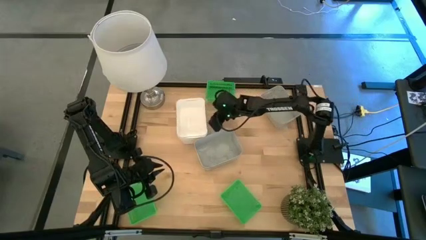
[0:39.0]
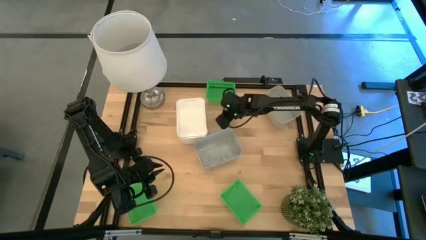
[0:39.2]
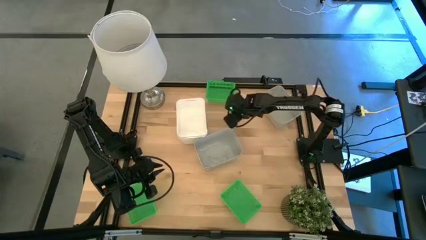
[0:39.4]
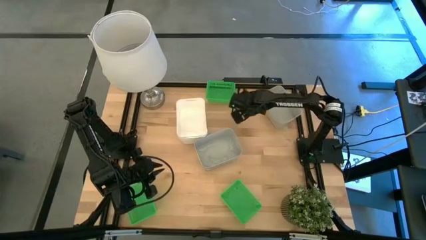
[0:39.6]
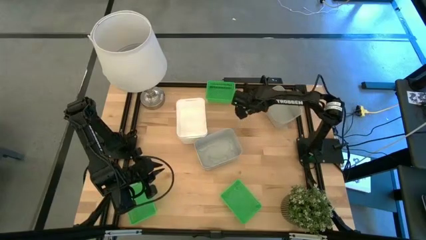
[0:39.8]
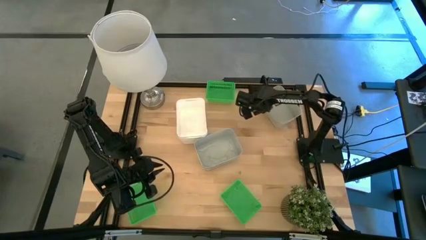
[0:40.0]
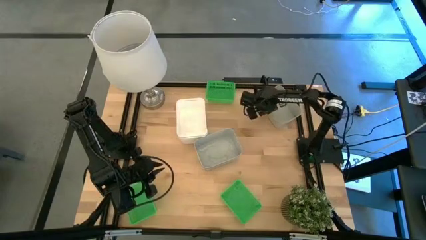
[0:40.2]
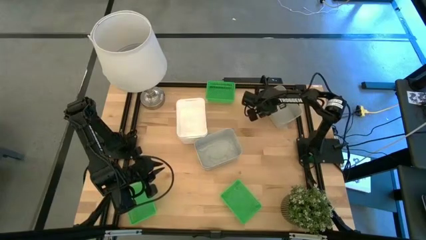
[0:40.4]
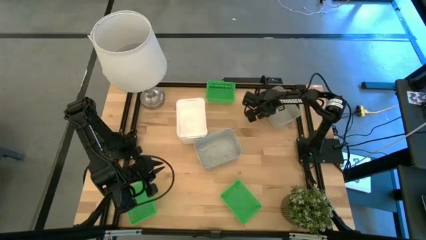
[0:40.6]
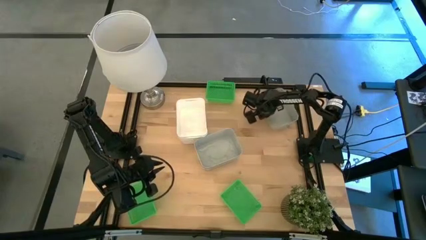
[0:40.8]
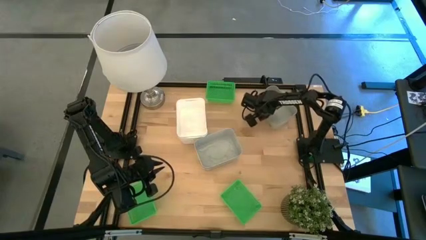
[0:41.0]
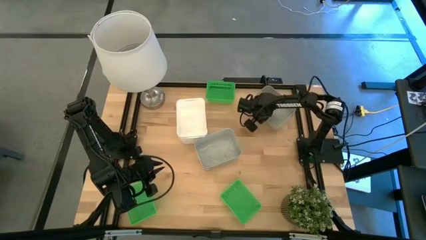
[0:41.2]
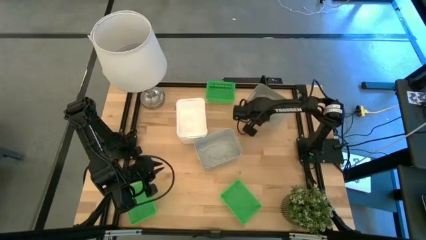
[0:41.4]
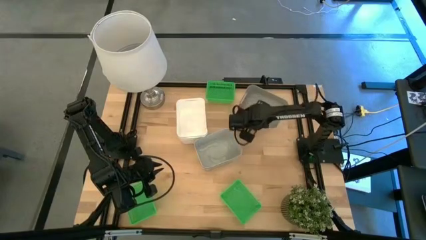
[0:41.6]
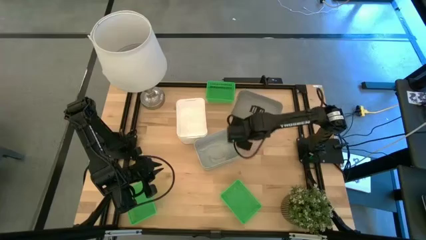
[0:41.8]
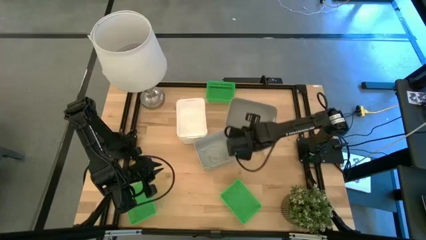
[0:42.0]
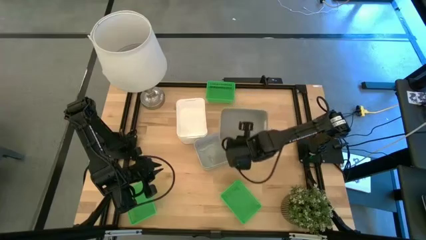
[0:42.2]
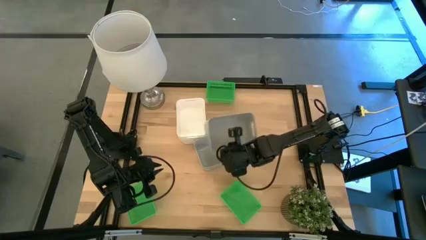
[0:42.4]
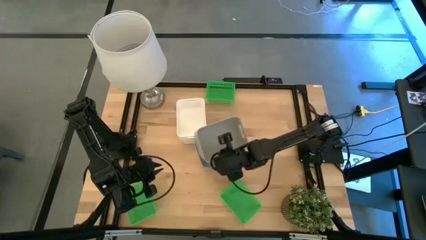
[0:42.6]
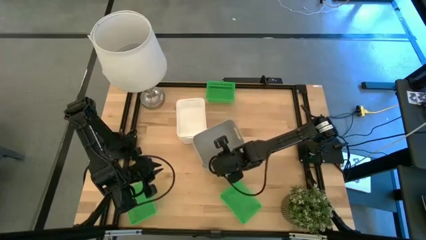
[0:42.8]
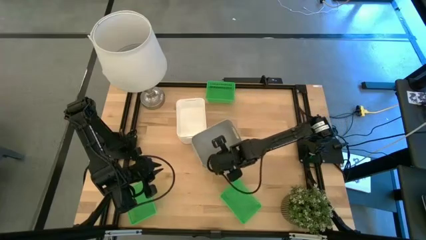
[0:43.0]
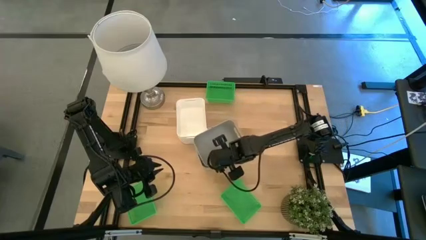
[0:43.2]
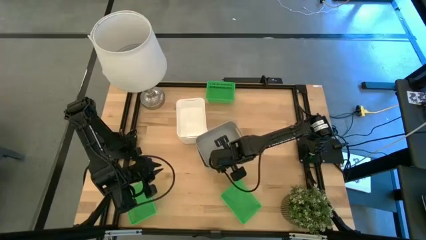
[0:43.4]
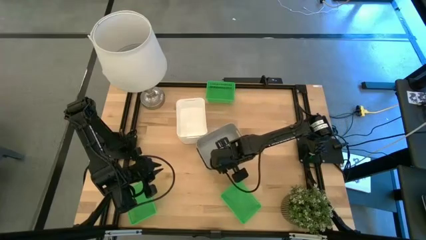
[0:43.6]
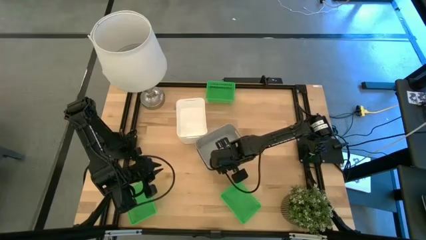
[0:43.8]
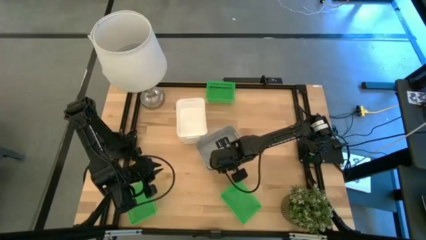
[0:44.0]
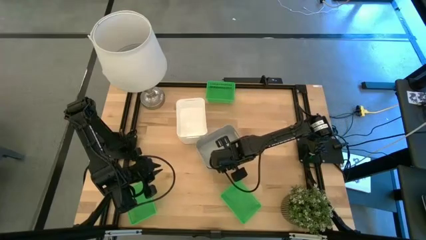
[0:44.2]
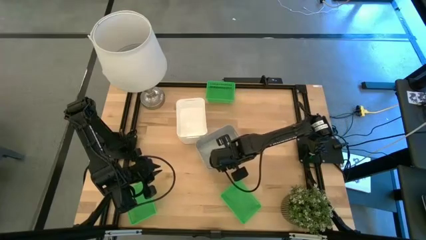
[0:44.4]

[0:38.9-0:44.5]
Stack the right gray bin on the left gray bin

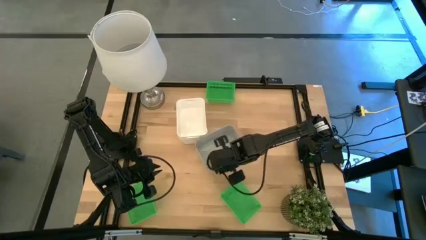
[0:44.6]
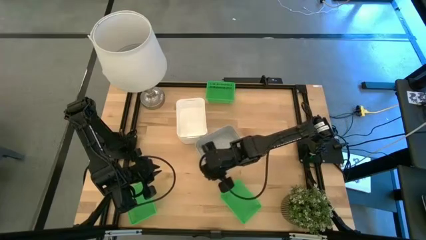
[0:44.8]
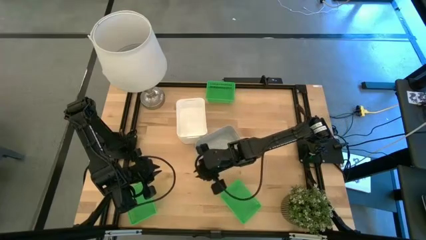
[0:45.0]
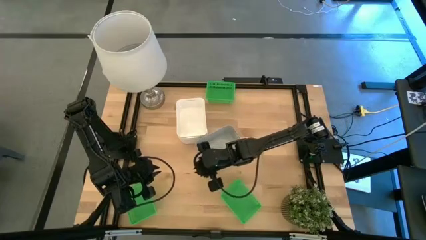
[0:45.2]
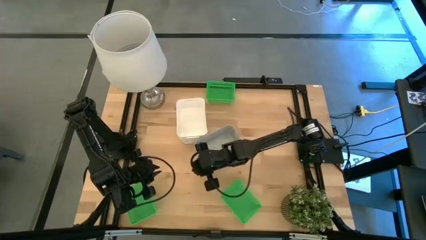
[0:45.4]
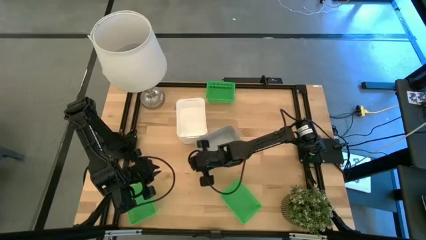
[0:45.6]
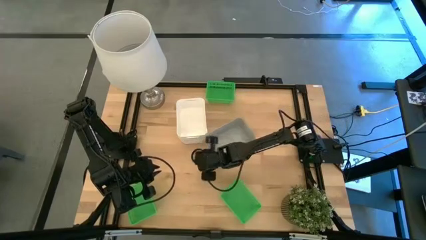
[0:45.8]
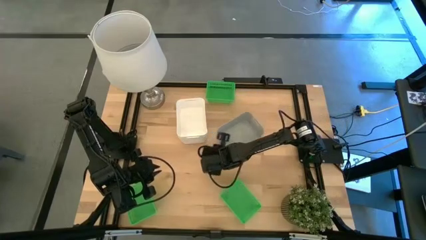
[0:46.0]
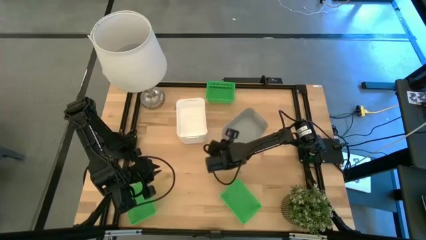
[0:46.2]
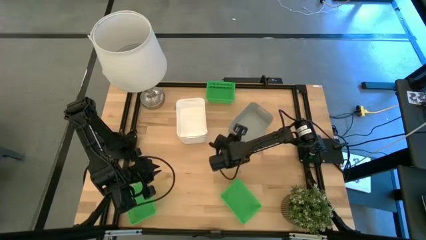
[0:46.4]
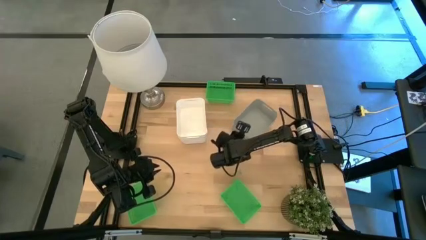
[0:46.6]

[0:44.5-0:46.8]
Move the stacked gray bin to the top right of the table

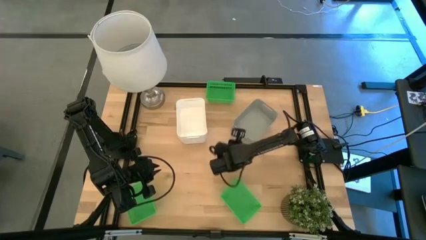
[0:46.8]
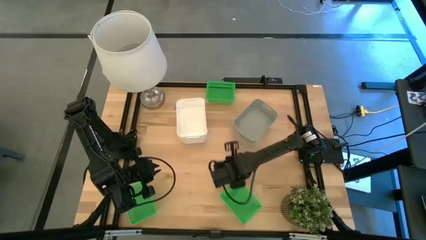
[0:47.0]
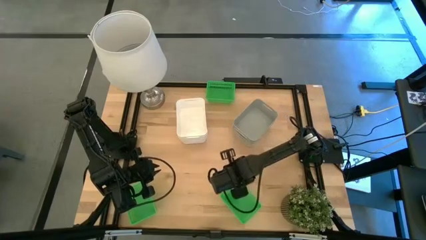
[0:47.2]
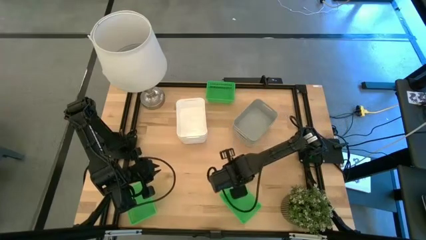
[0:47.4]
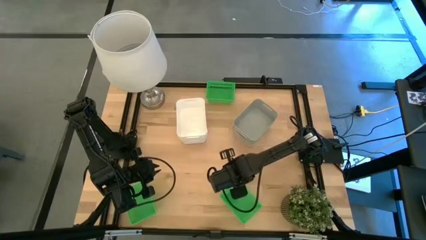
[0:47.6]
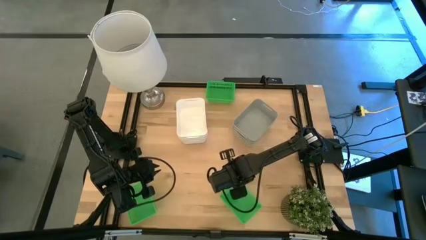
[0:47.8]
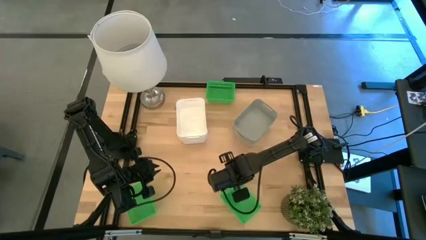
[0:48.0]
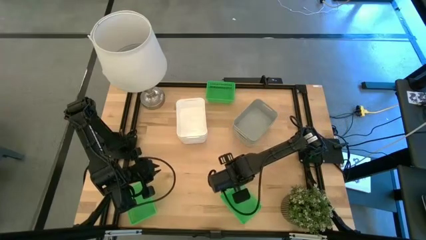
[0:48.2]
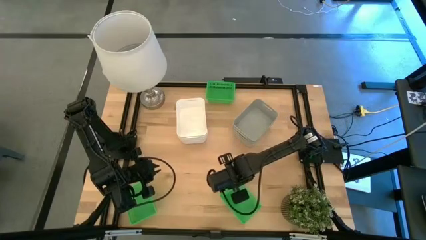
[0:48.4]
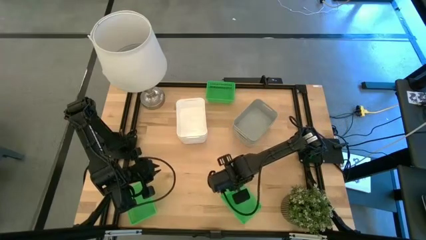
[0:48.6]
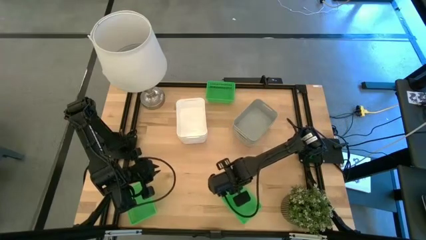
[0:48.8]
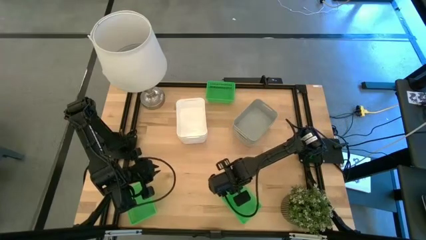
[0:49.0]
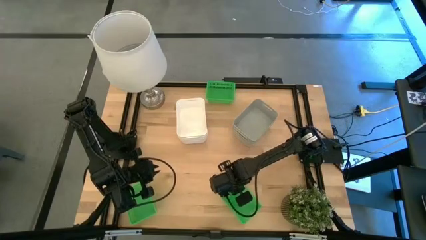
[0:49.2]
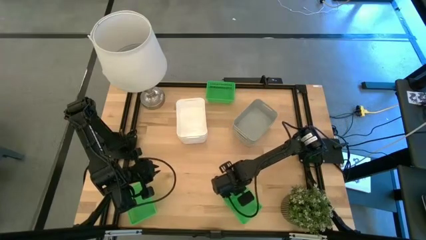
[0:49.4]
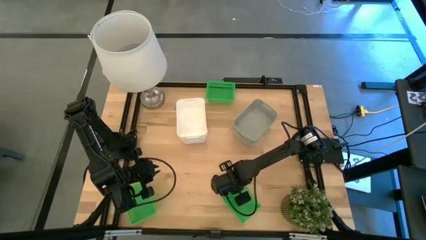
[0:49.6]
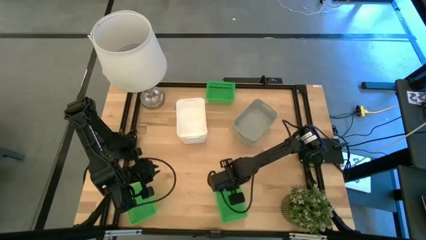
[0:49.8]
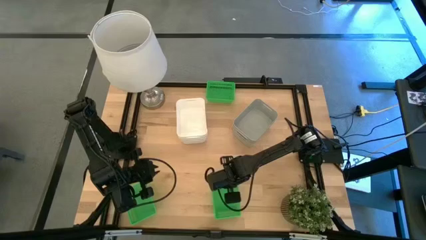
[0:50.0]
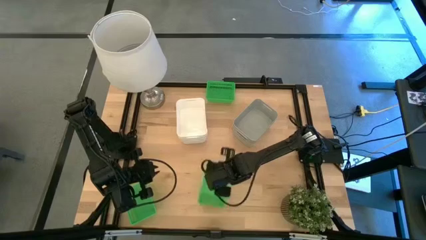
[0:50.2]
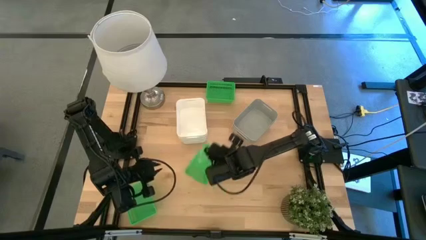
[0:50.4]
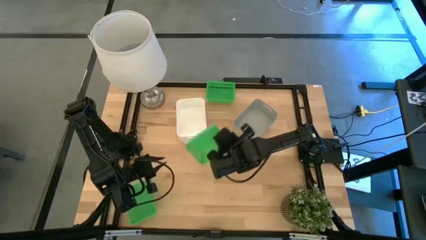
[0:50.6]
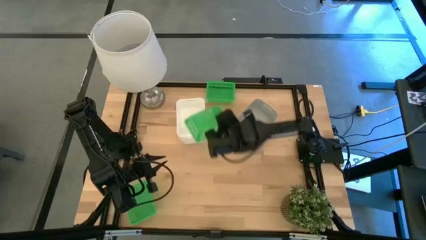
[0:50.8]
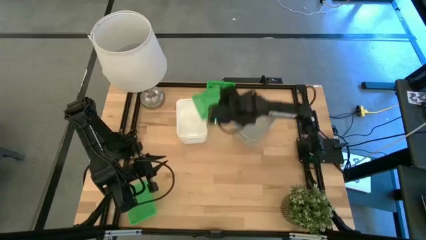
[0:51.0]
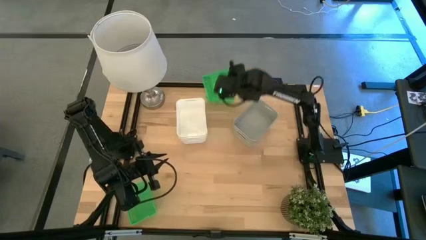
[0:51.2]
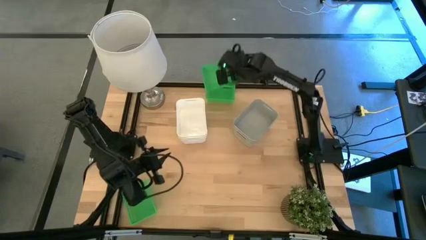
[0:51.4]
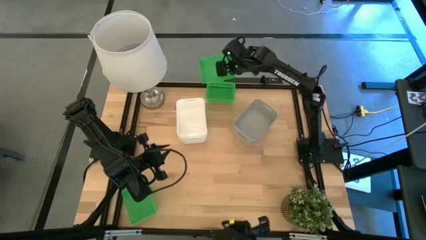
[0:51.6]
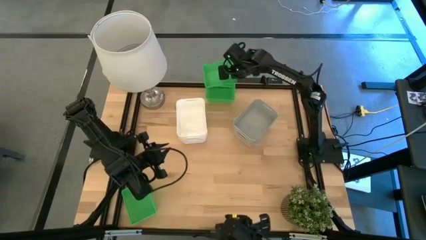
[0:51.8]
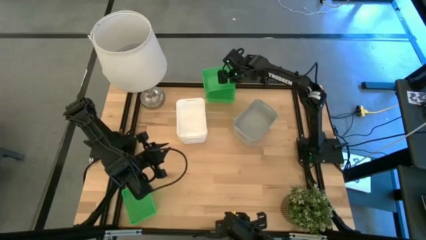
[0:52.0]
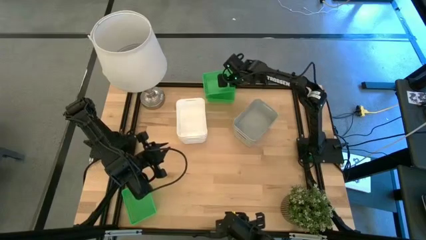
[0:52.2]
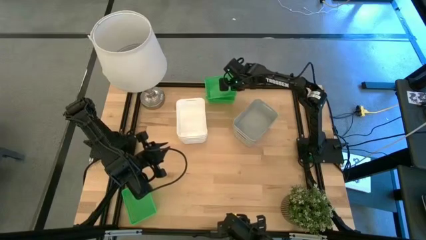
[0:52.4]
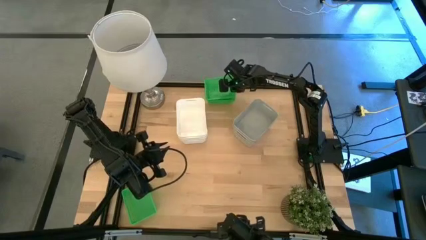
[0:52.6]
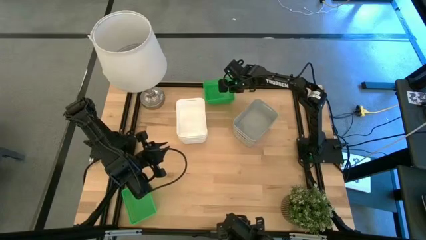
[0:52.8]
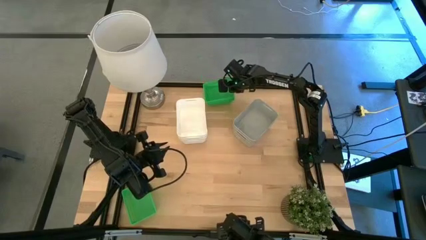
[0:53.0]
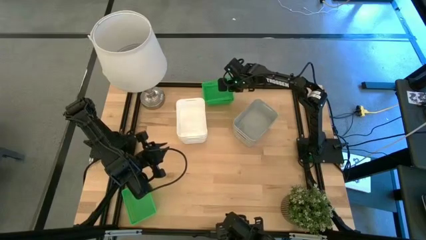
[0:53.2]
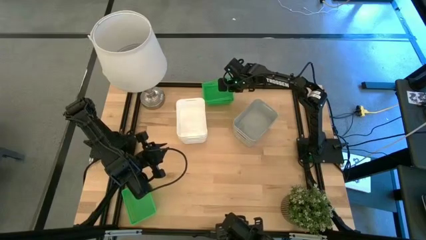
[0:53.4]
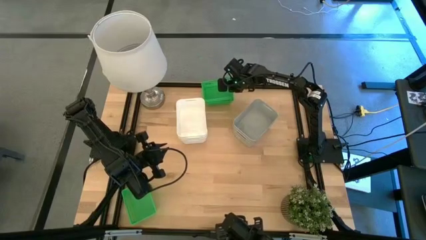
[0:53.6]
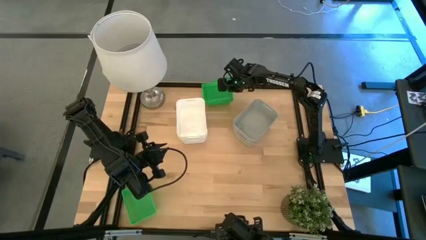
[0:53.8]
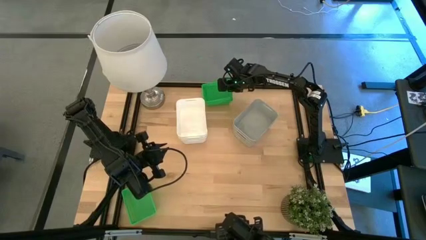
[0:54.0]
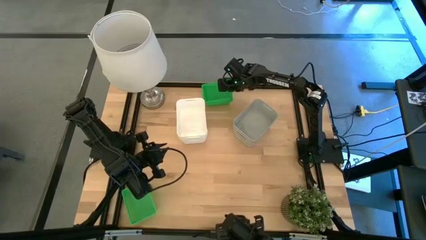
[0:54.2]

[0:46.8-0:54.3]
Stack the bottom right green bin on the top green bin
